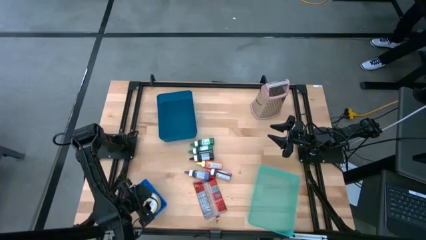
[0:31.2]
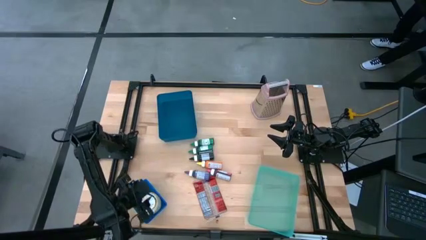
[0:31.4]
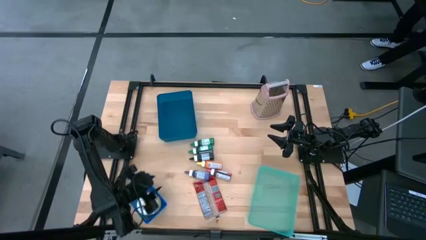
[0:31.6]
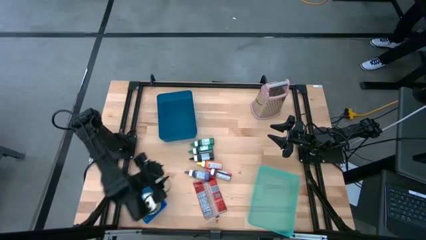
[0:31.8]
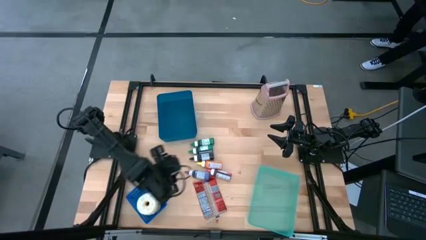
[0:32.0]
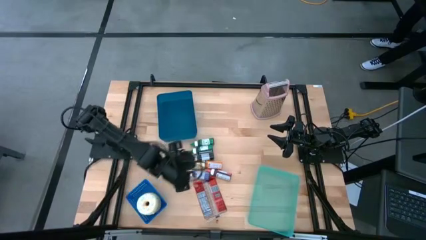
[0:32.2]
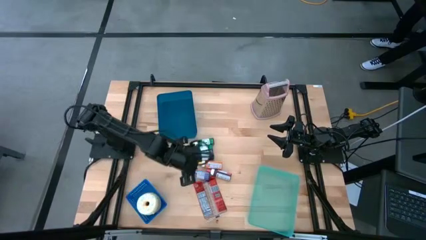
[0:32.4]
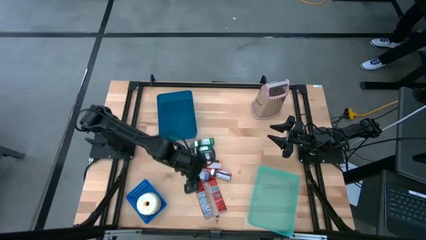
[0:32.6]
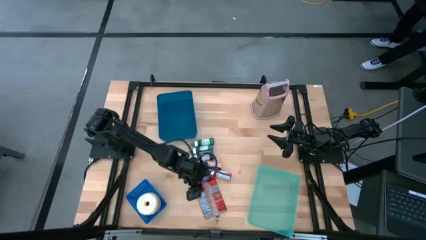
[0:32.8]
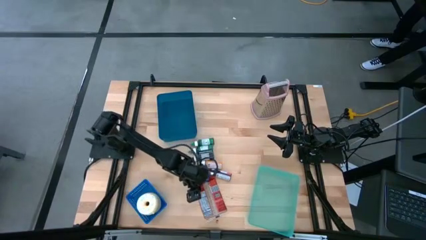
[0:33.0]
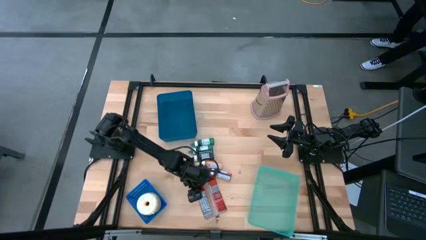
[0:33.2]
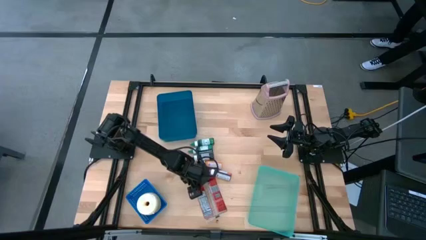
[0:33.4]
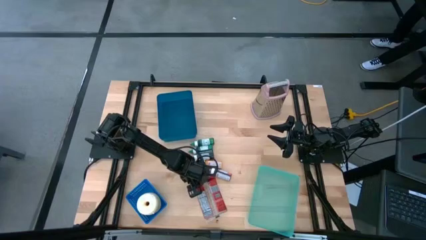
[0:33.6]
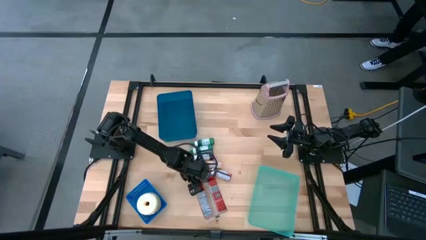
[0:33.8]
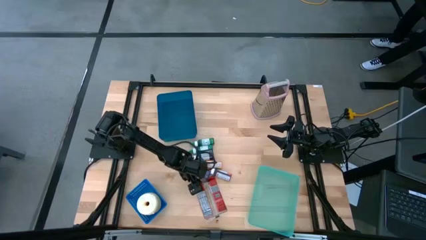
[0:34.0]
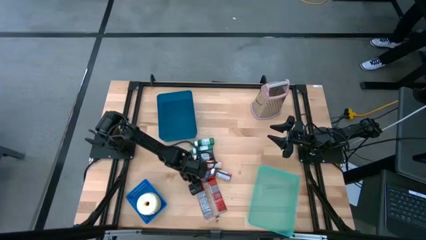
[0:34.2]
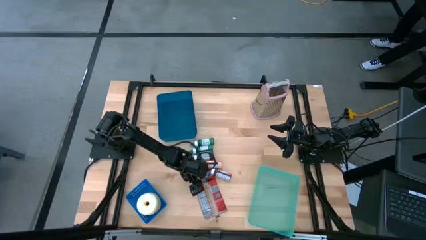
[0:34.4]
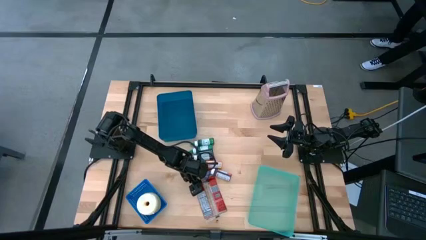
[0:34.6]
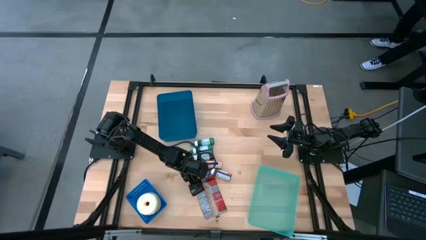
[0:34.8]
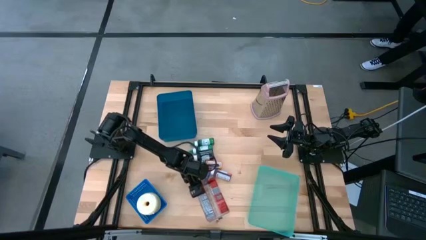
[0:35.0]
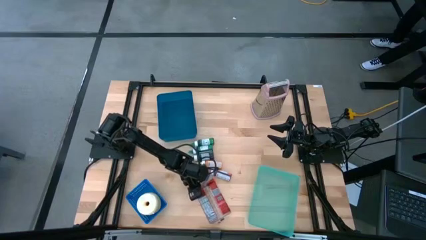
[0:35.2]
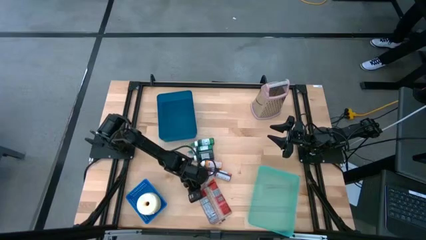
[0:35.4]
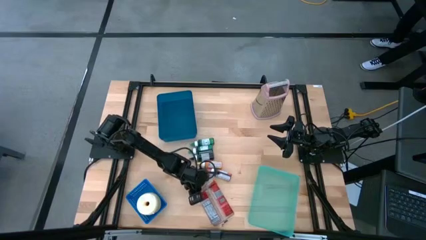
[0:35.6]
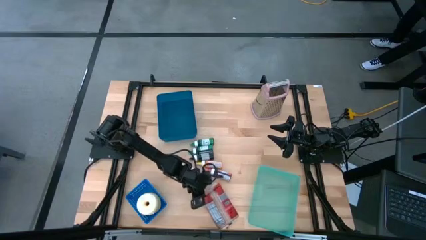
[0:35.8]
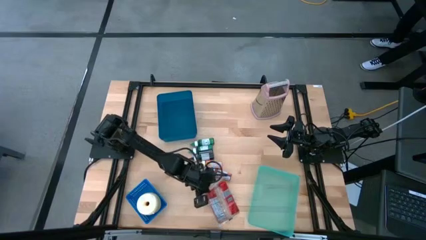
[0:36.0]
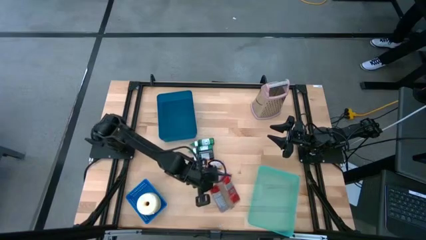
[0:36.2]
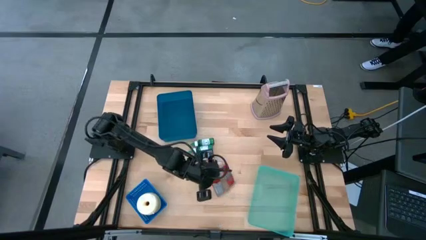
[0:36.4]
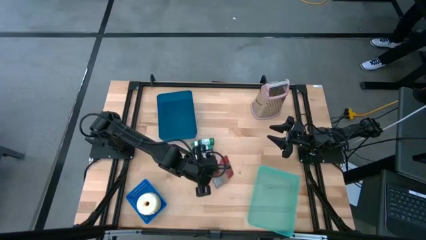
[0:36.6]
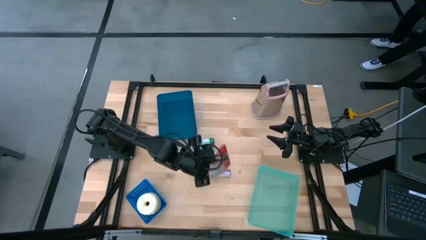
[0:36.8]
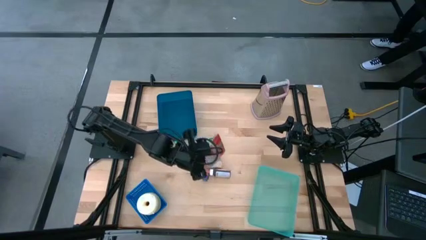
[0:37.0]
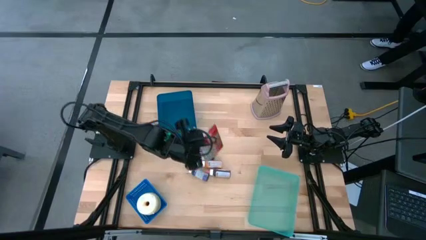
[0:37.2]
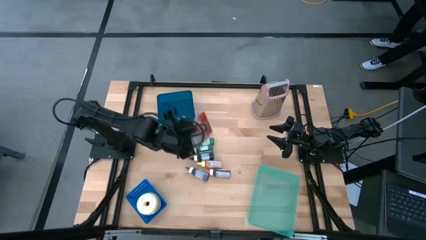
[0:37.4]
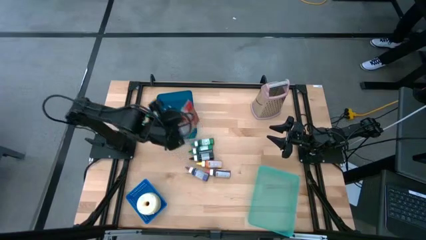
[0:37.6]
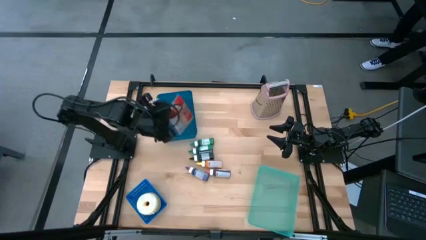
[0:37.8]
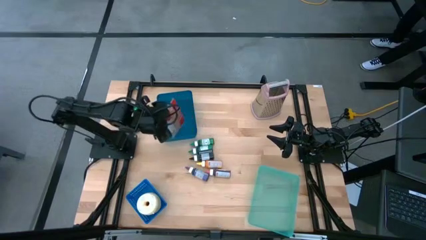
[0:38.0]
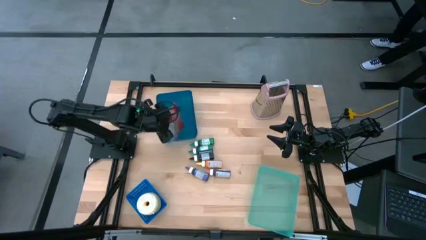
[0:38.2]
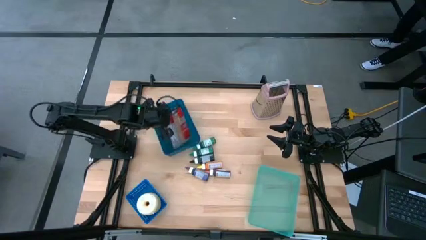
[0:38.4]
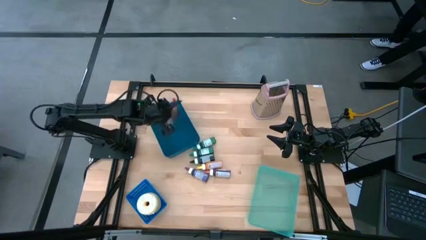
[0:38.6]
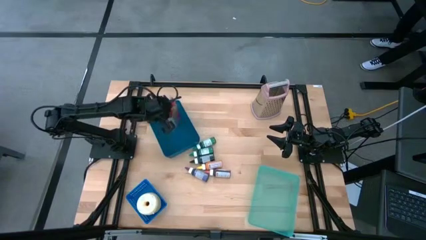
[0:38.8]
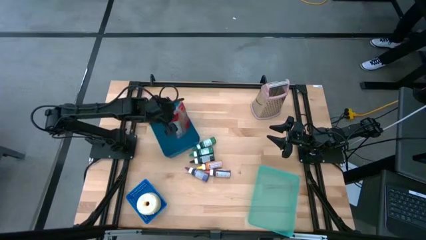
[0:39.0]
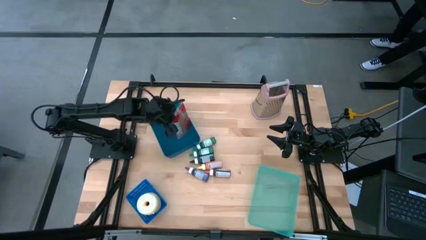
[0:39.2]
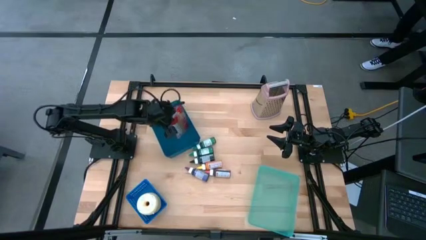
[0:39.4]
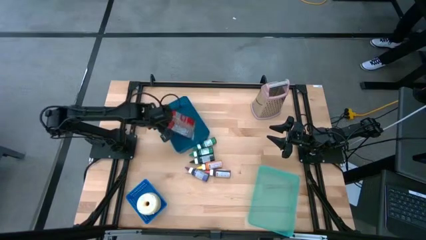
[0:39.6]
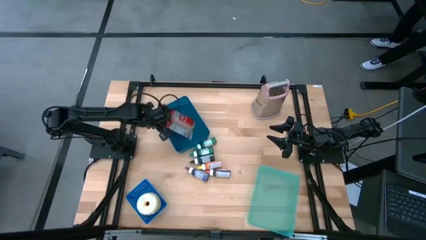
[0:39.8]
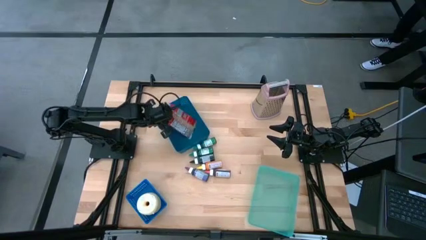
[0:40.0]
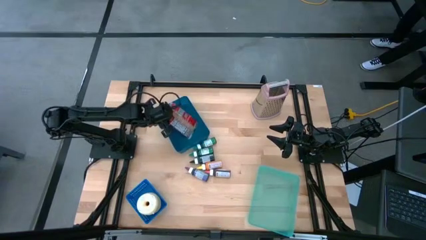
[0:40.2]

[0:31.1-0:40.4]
Put the red popcorn bag into the blue bin

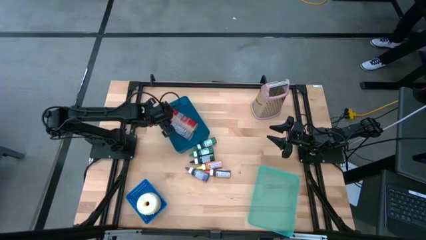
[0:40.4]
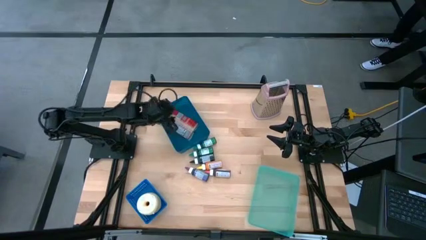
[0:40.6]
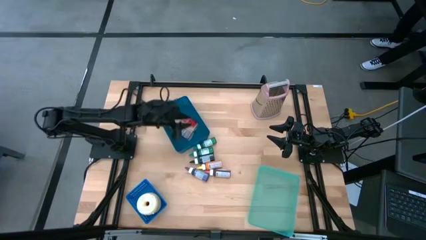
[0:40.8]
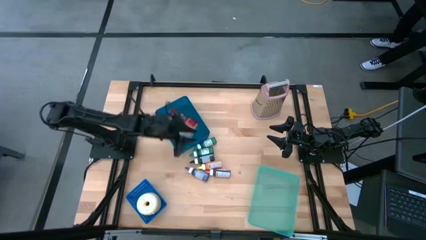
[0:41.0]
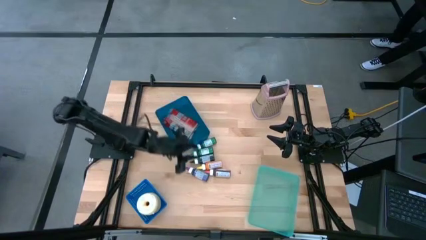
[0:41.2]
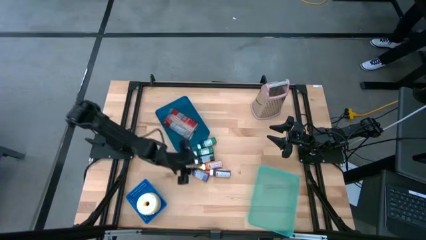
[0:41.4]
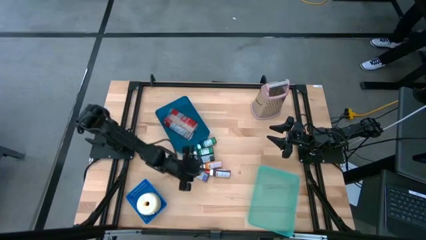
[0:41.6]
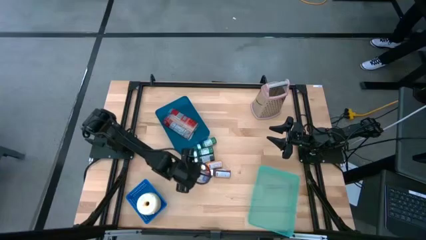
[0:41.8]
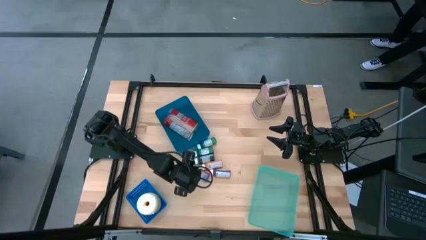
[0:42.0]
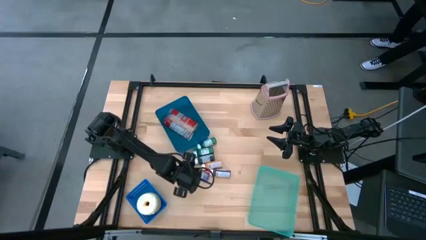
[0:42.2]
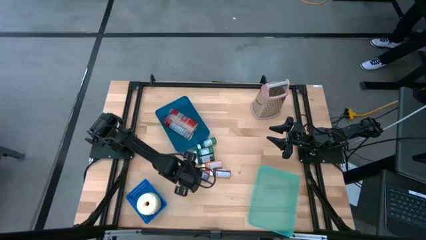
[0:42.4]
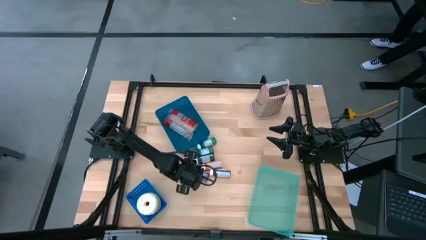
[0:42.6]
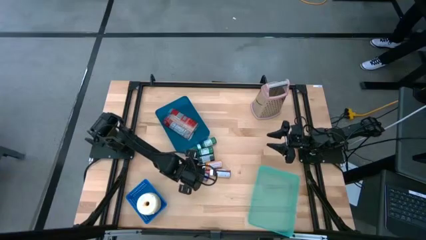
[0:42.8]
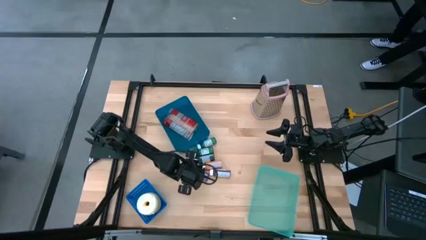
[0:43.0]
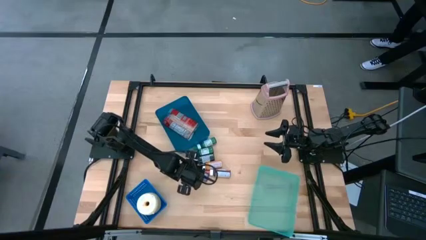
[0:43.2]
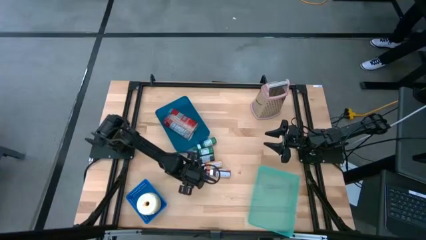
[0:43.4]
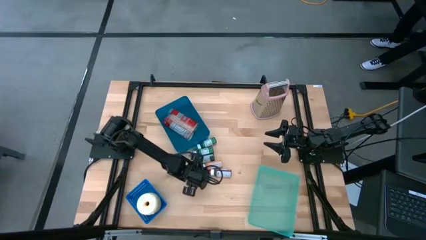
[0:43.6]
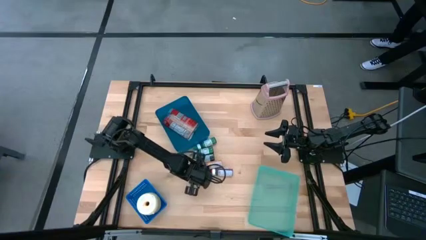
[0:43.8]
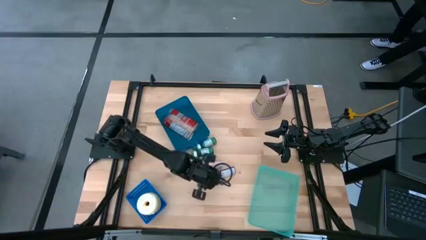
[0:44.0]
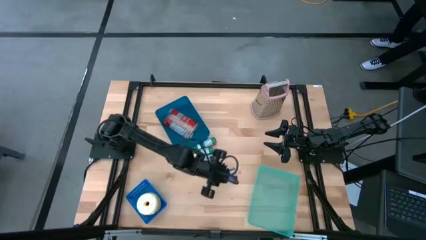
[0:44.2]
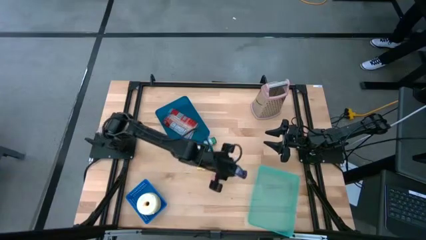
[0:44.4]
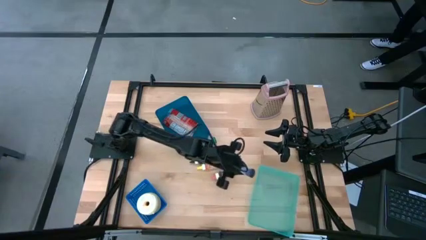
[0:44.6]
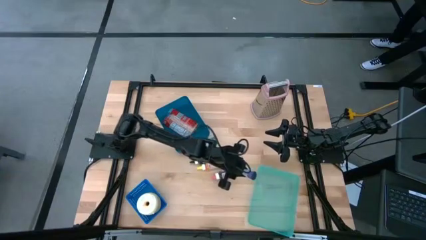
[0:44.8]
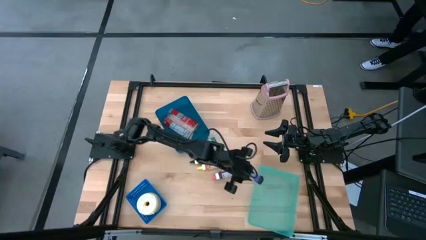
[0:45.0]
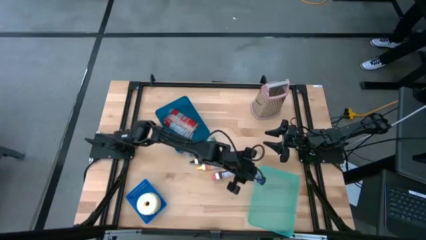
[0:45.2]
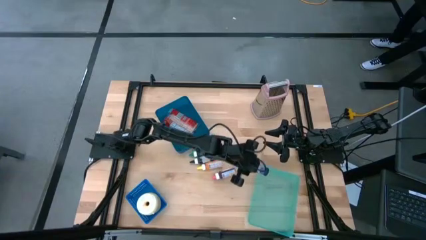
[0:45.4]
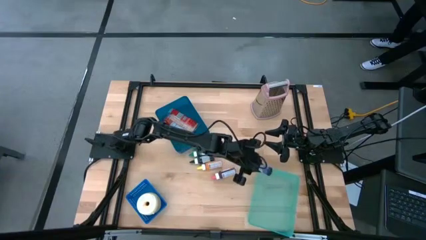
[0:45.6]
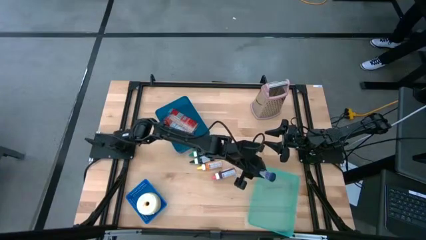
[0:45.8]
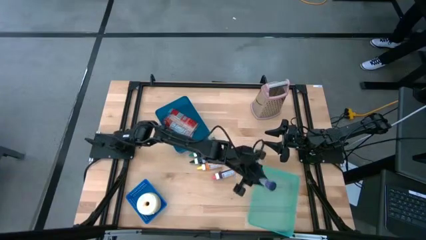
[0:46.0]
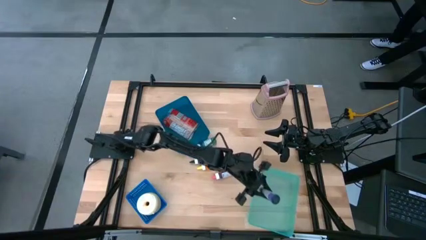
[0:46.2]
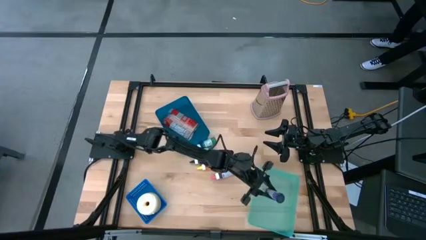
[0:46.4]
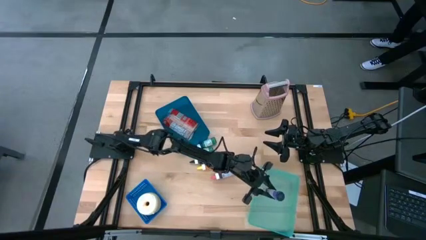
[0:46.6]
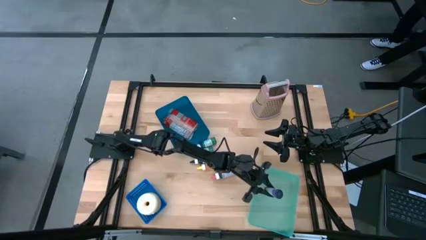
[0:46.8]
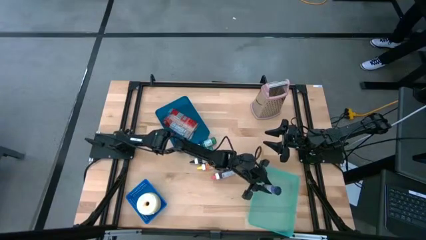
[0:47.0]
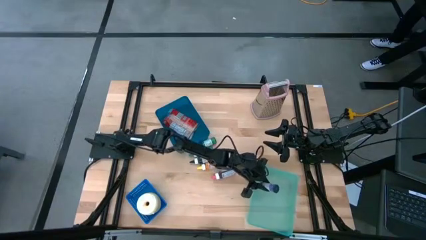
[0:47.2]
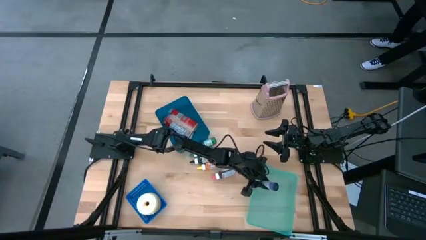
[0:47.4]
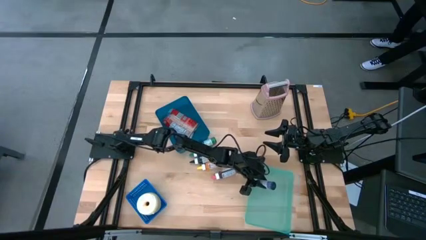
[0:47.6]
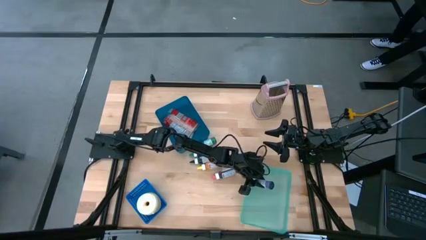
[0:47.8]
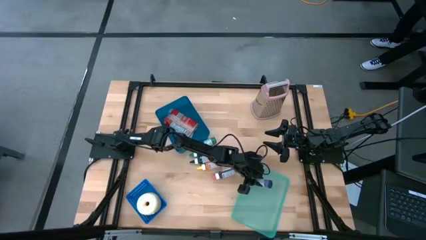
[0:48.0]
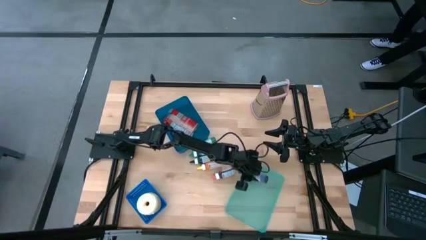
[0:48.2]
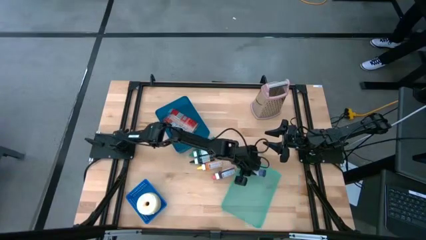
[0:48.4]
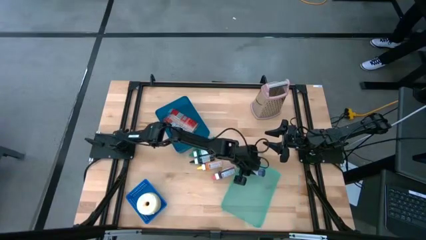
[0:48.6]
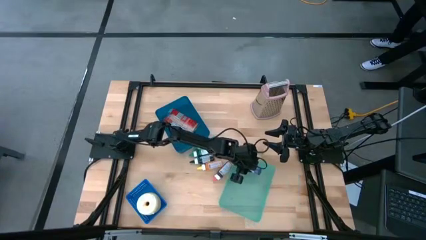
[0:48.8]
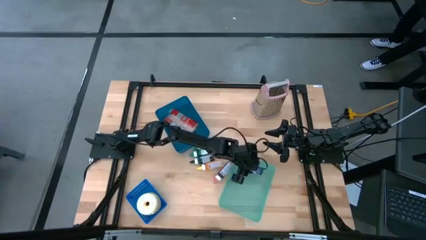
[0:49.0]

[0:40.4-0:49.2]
Put the violet food coloring bottle into the green bin
